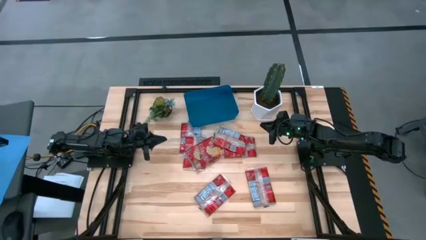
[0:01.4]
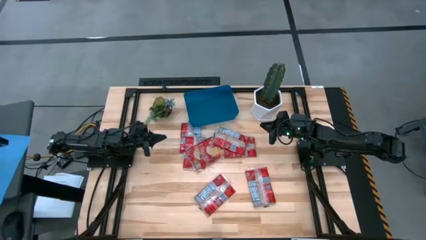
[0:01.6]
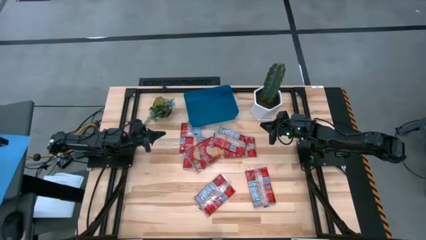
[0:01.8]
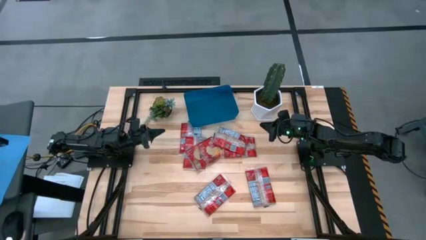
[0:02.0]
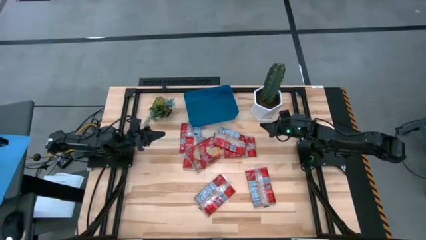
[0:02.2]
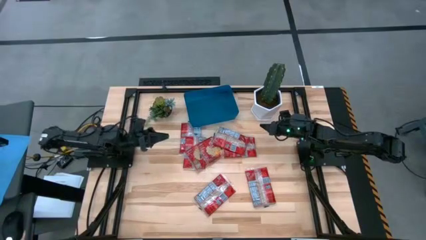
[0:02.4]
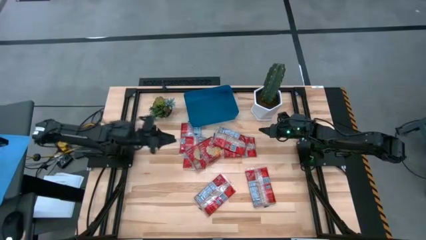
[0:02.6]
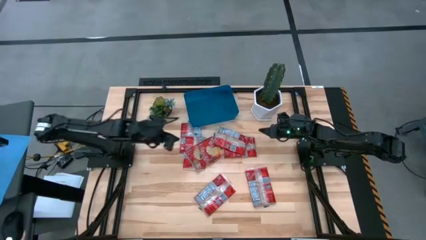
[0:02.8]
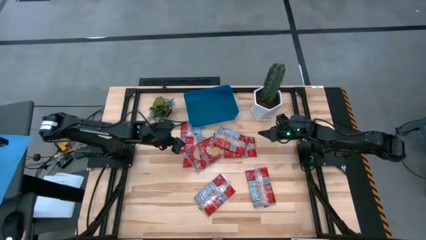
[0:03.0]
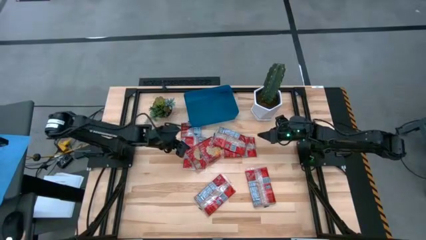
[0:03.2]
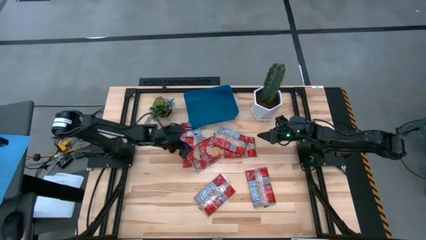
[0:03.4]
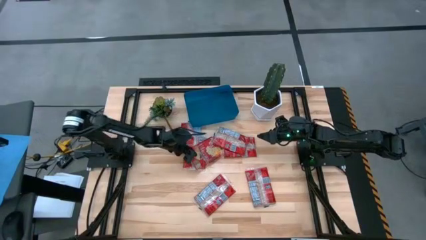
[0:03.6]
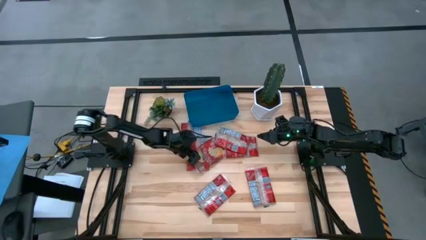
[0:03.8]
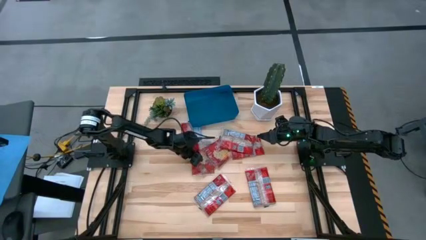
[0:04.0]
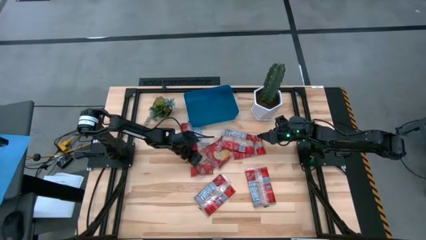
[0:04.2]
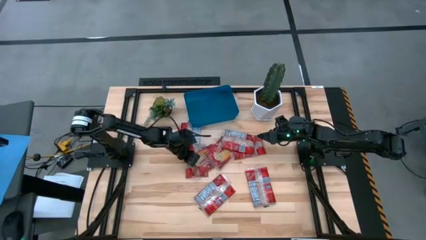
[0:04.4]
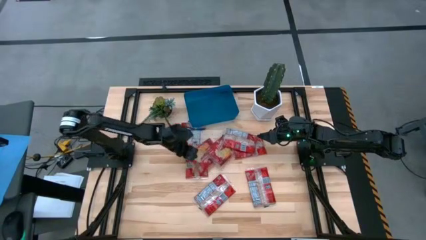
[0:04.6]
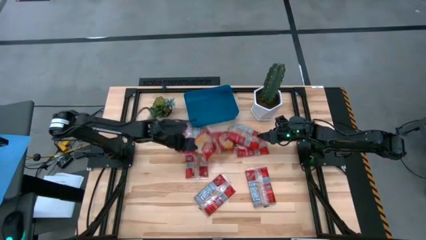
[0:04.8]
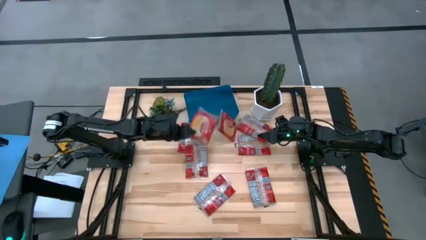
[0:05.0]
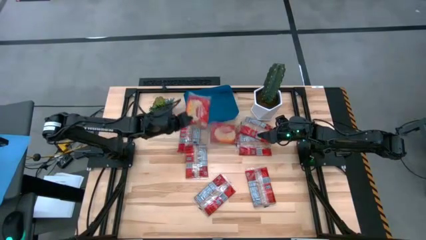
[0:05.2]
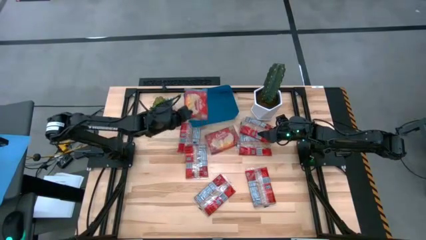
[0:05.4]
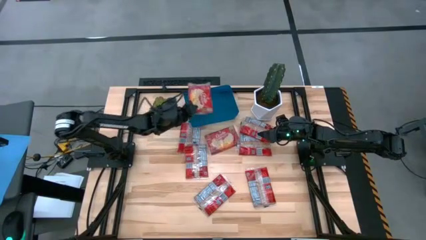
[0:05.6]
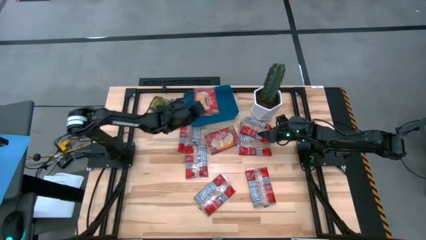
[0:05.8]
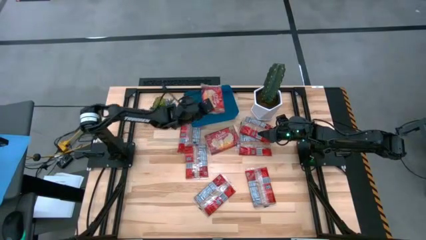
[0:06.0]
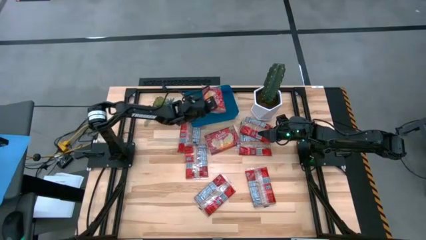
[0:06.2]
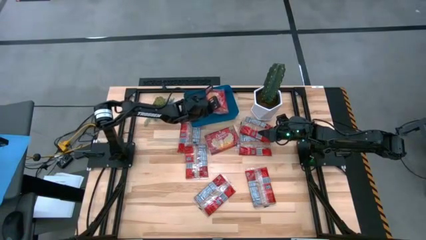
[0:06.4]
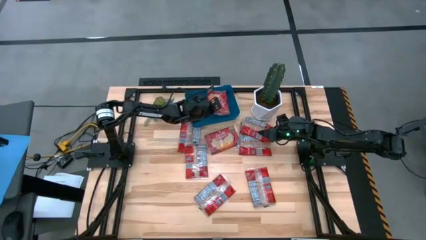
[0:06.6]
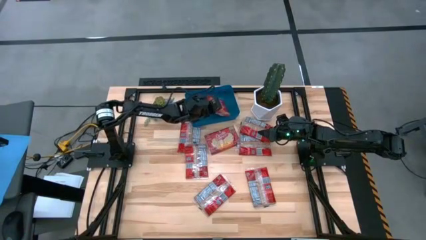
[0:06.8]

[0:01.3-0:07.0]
Task: Sort popcorn bags into baskets
Put the popcorn bag into the blue bin

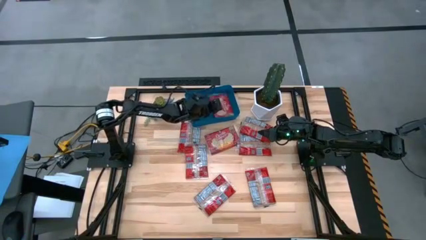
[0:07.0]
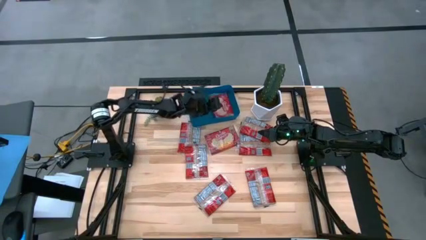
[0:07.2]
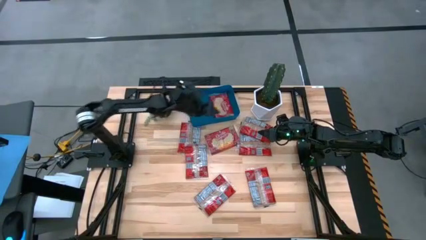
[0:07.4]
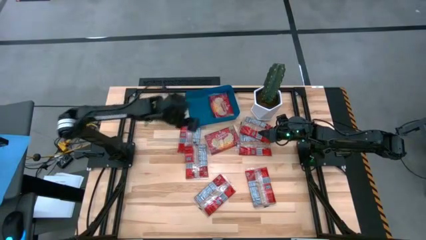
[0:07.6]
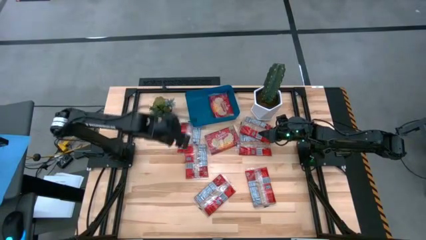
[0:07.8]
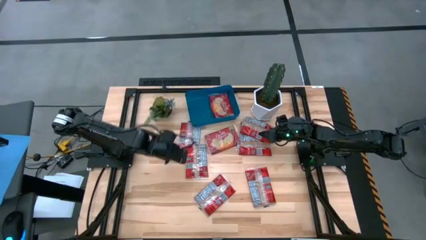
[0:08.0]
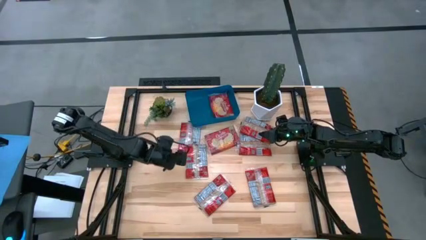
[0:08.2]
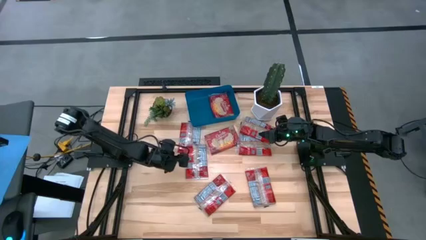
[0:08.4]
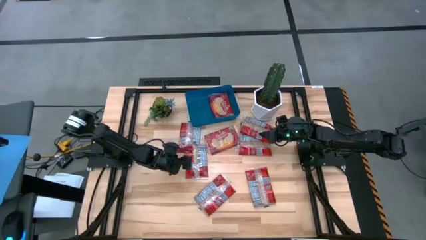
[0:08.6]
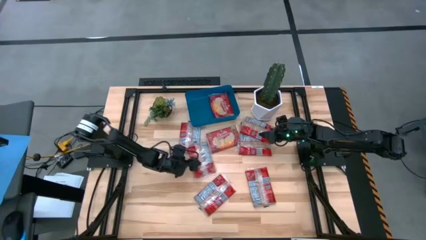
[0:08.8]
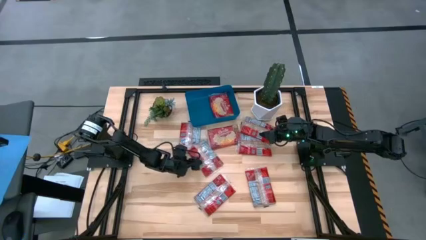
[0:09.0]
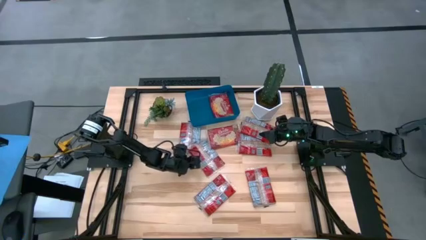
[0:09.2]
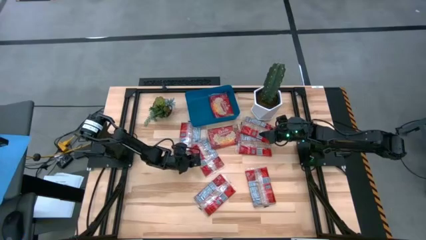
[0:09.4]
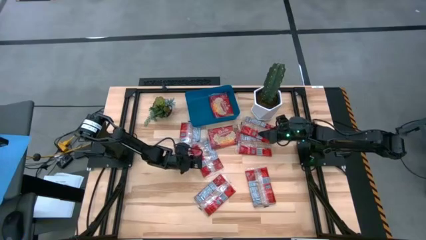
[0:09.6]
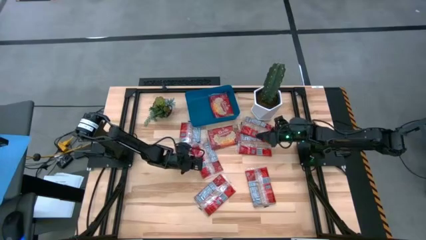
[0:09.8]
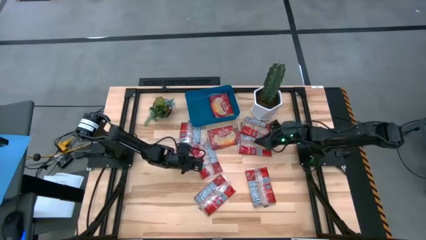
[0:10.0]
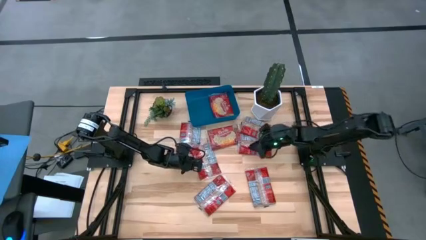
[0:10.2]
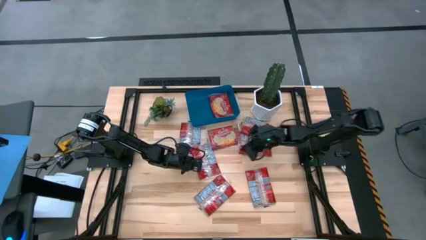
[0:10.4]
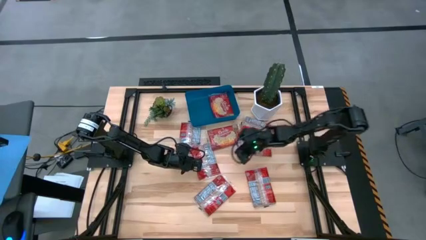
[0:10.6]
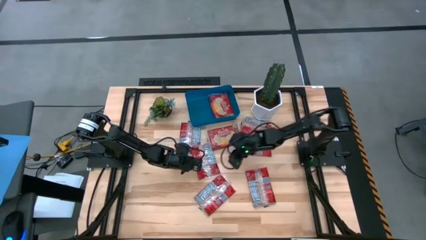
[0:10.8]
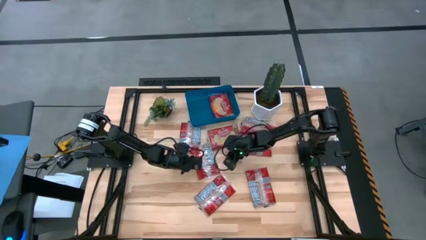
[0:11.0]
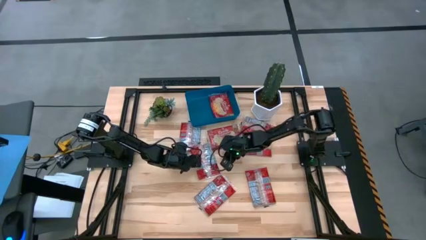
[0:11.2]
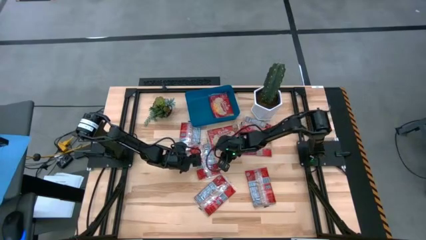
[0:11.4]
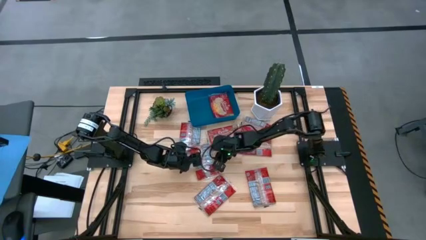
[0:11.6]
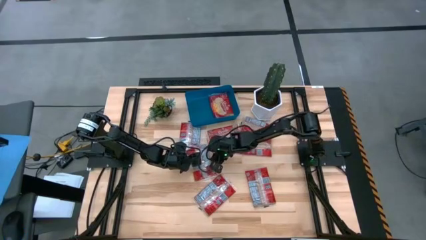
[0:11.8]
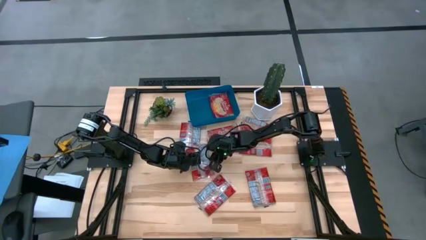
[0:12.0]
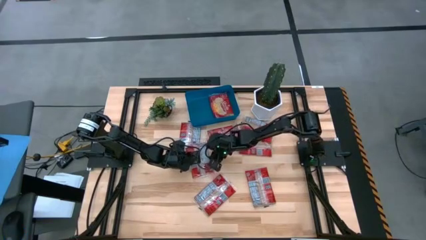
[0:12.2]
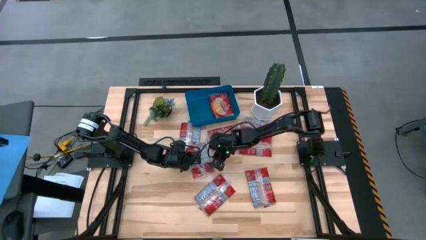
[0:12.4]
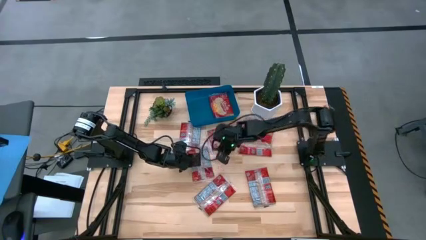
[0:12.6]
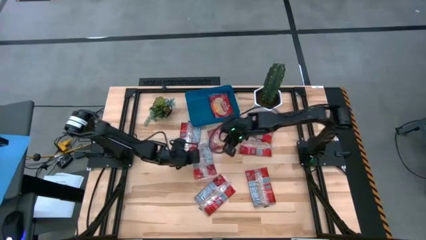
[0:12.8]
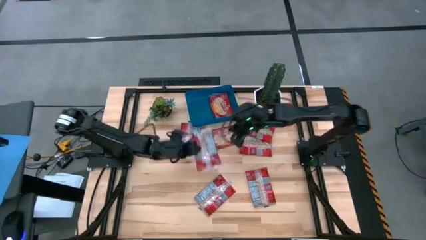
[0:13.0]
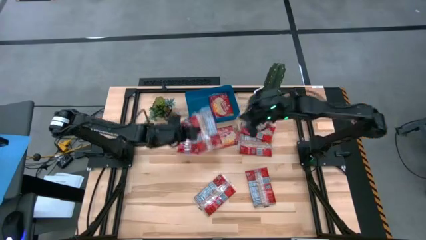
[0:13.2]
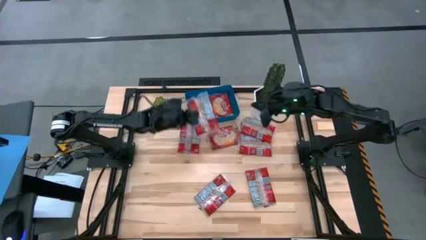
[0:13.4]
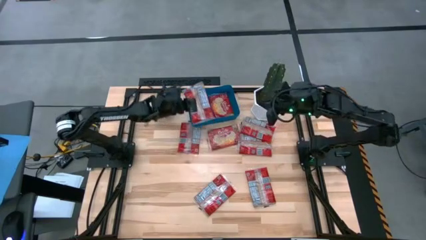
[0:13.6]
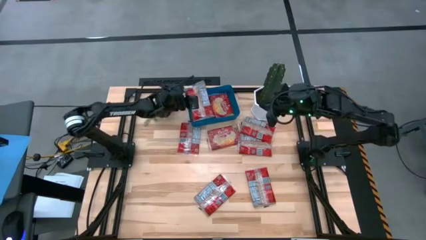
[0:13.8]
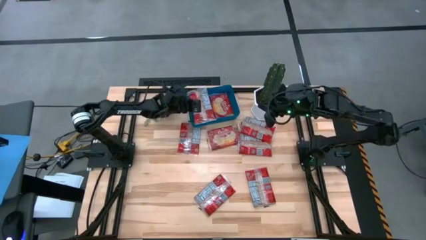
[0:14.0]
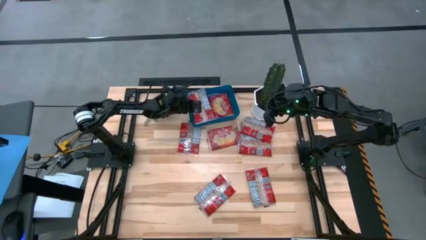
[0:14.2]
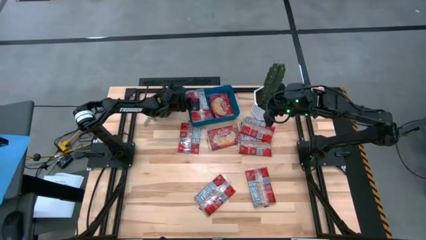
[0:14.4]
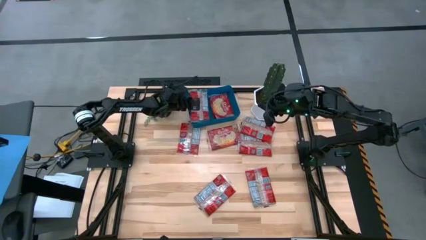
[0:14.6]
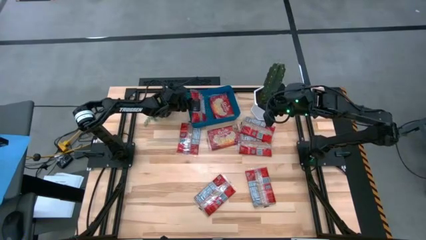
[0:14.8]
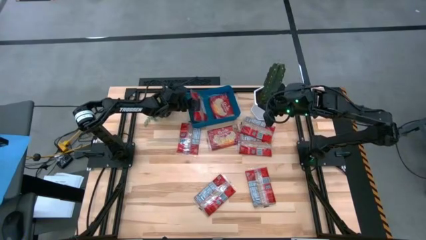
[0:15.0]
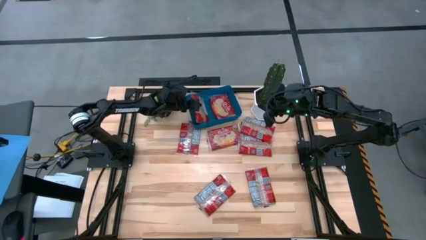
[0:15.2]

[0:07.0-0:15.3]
Put the popcorn bag into the blue bin

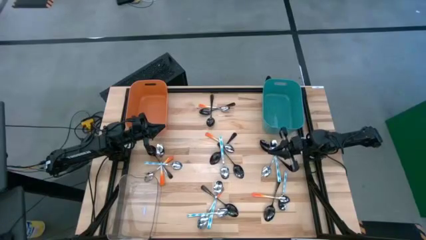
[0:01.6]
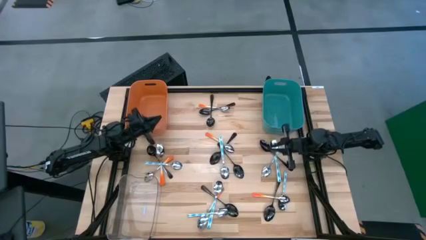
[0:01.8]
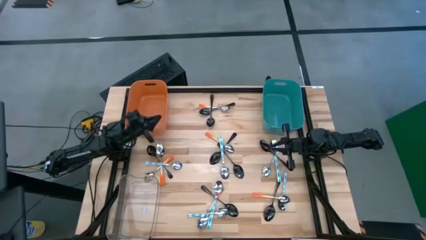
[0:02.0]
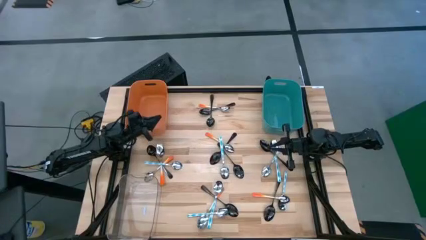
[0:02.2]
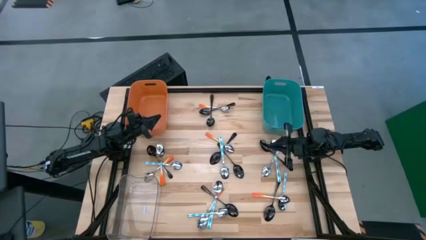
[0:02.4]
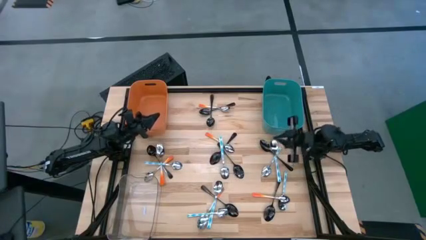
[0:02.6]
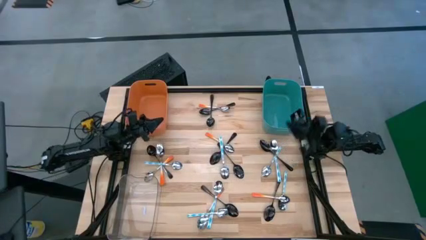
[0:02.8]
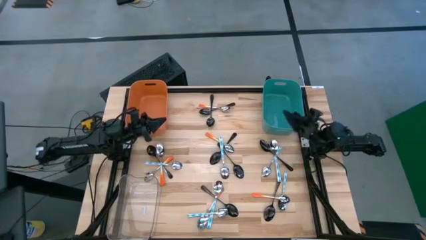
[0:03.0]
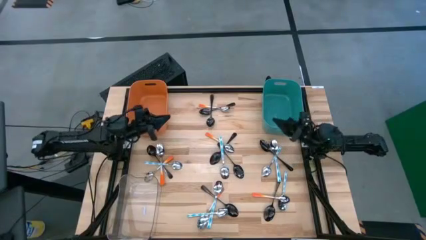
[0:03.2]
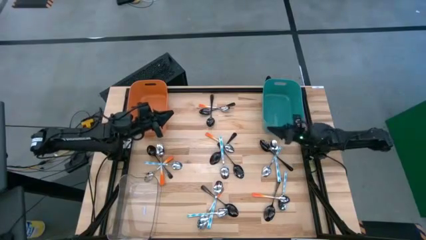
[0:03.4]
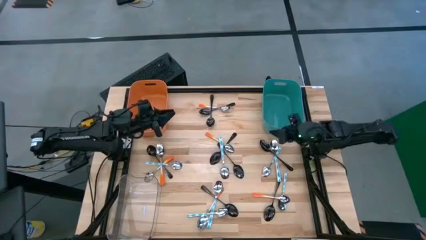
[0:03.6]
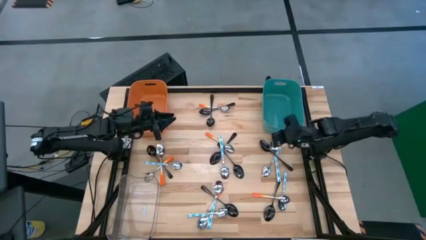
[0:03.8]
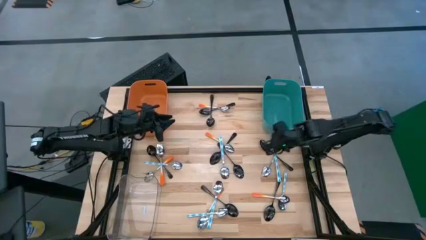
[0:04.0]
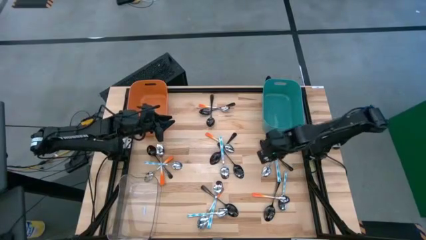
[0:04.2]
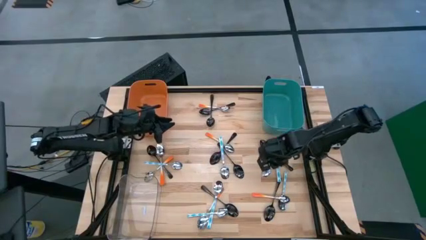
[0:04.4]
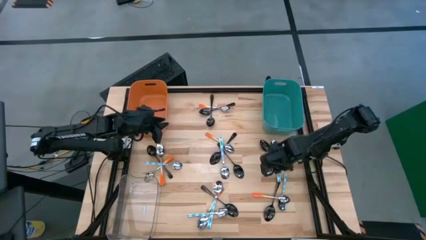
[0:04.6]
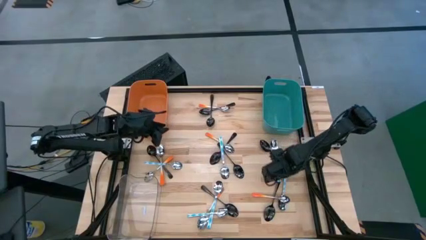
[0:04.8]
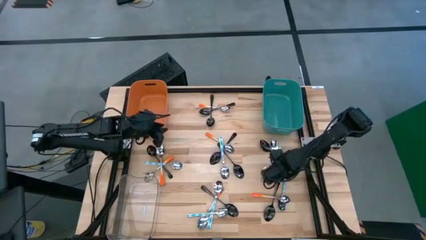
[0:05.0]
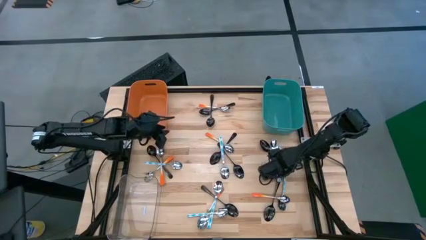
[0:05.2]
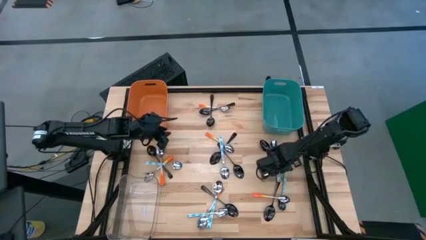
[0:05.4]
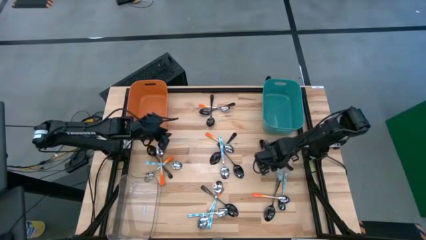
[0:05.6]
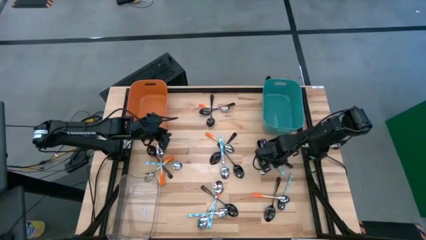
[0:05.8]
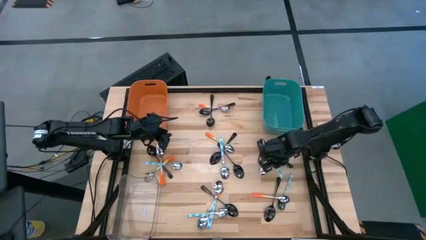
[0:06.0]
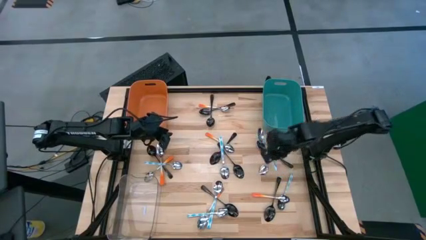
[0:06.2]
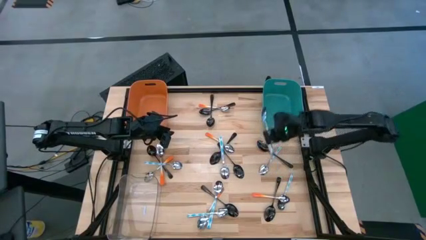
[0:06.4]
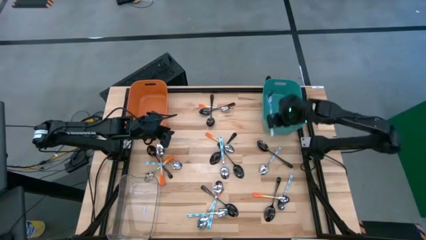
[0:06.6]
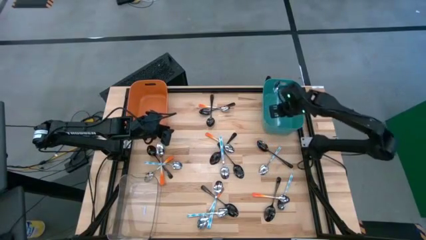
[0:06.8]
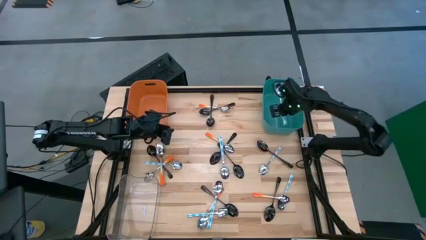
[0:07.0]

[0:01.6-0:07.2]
Task: Sort silverware by color (type)
Put the blue patterned spoon into the blue bin
